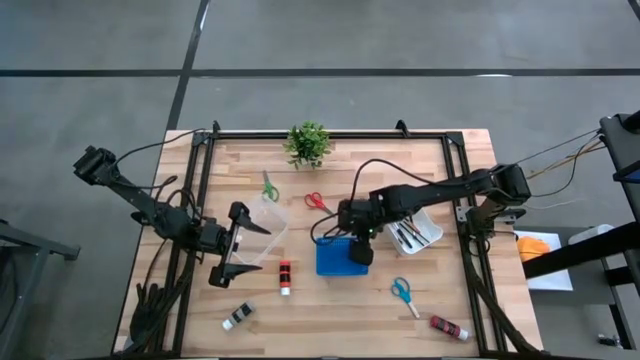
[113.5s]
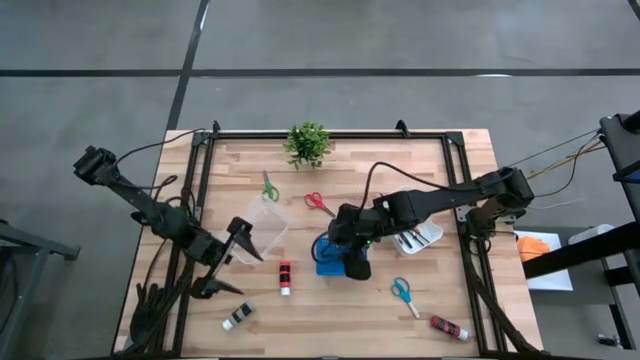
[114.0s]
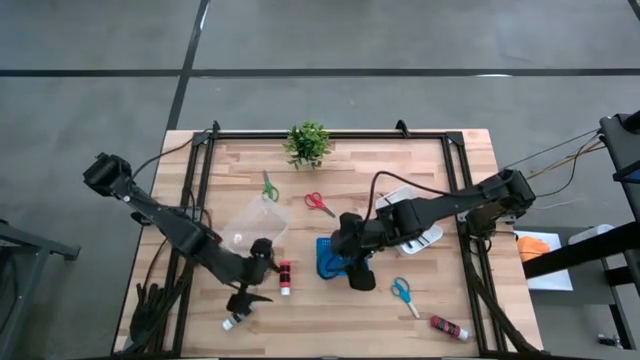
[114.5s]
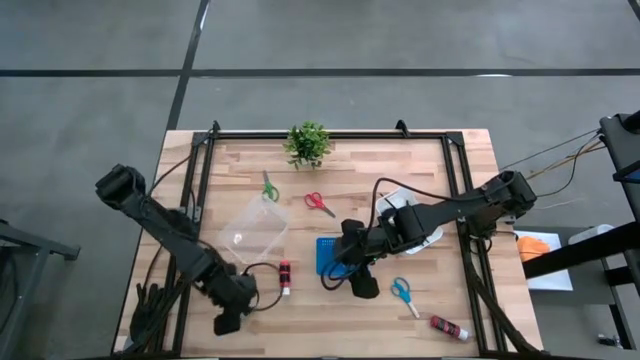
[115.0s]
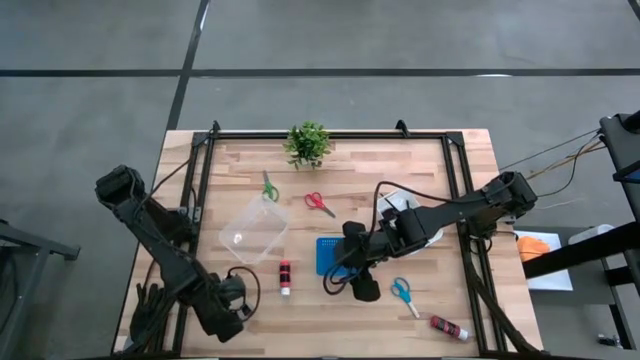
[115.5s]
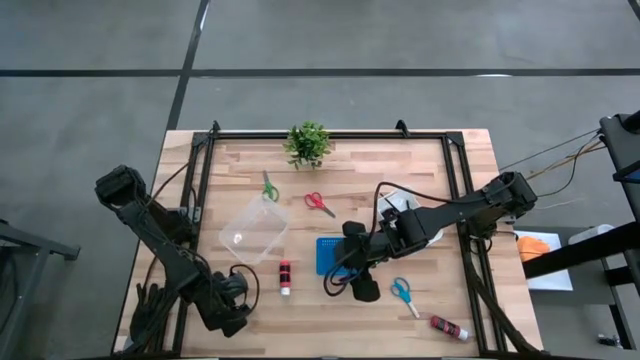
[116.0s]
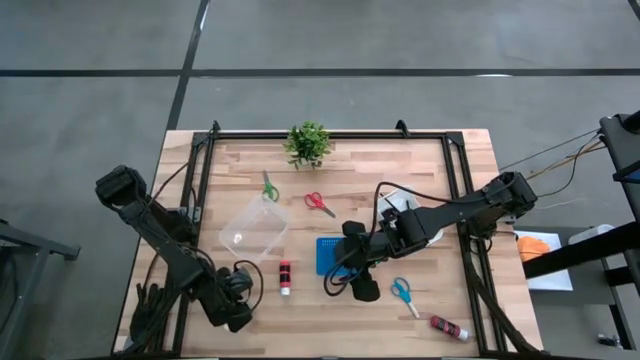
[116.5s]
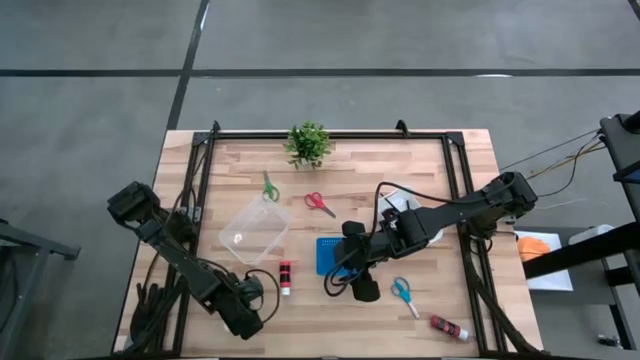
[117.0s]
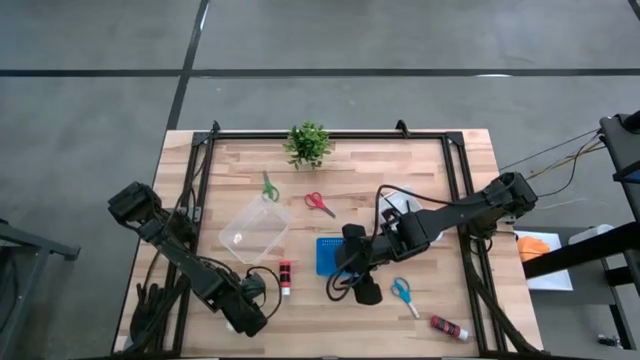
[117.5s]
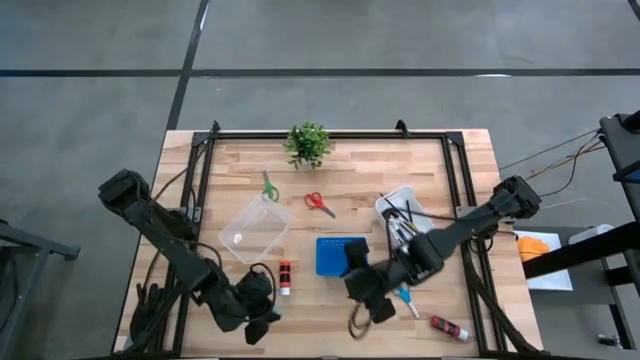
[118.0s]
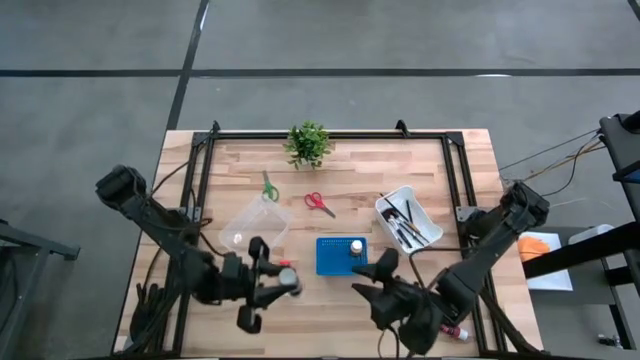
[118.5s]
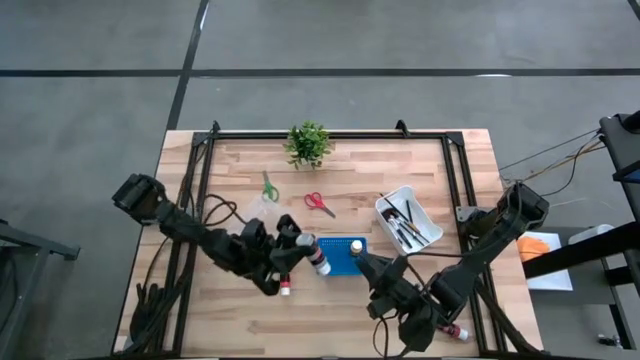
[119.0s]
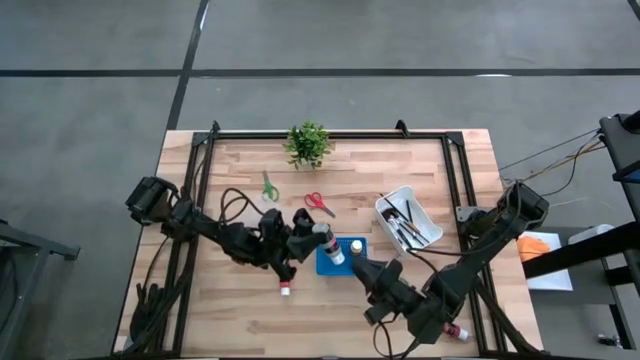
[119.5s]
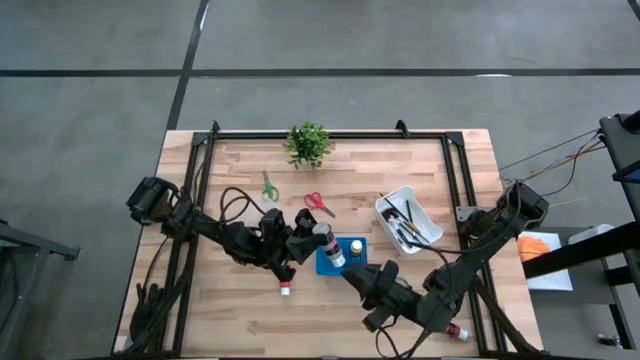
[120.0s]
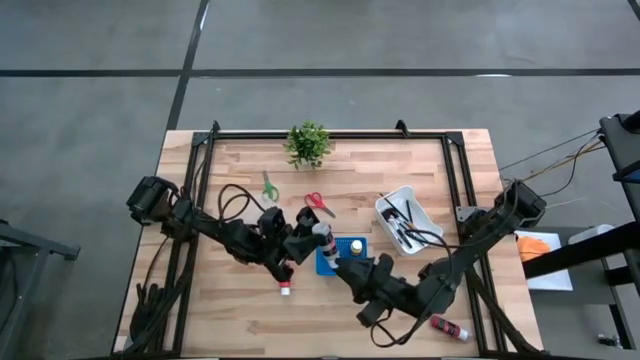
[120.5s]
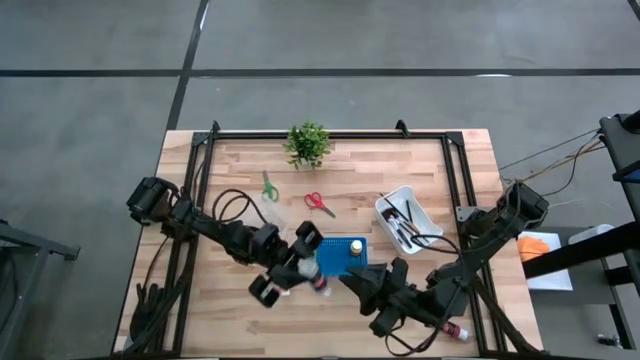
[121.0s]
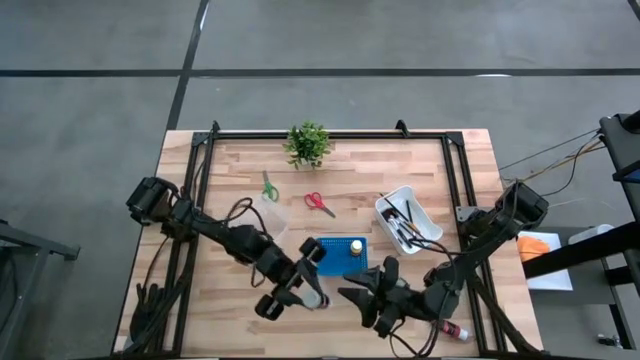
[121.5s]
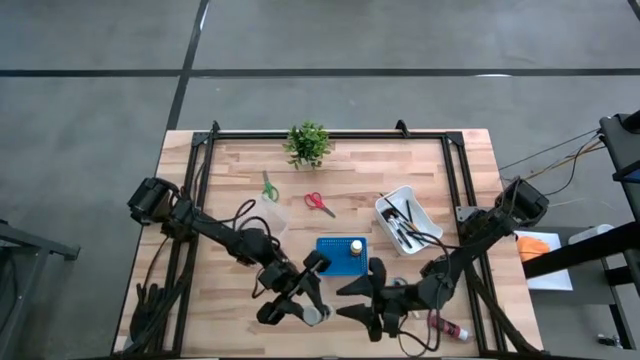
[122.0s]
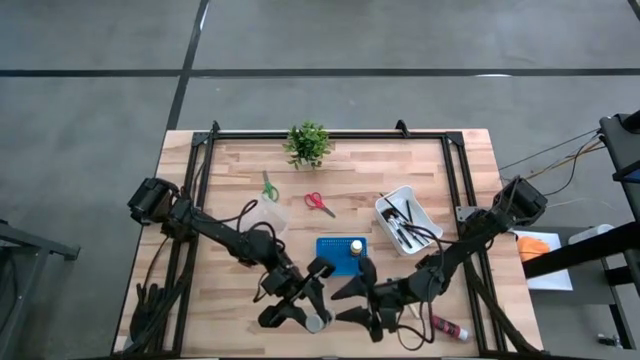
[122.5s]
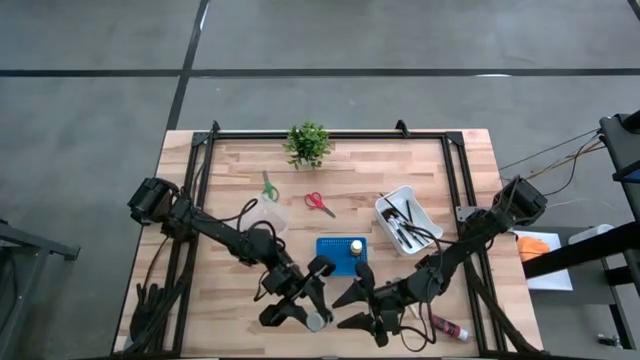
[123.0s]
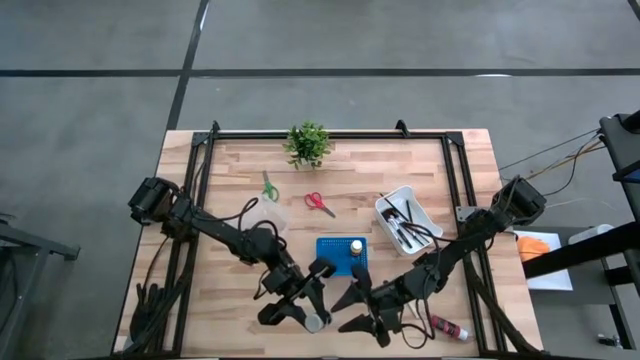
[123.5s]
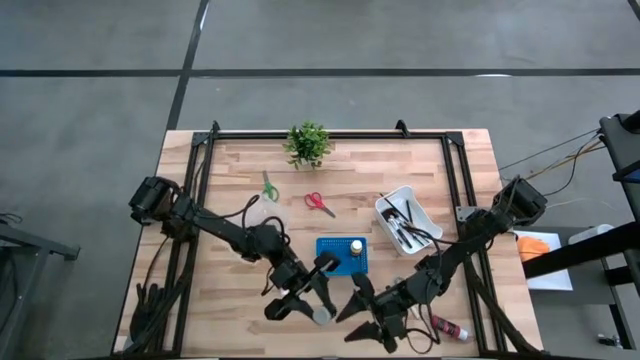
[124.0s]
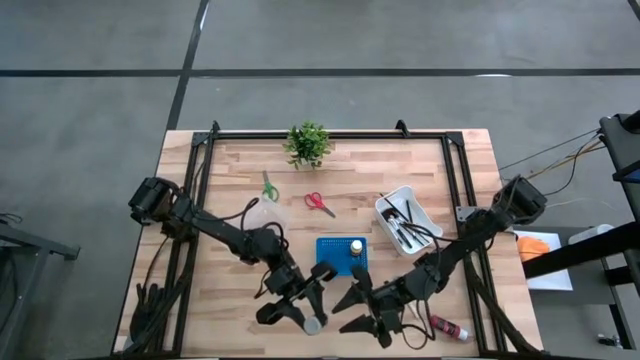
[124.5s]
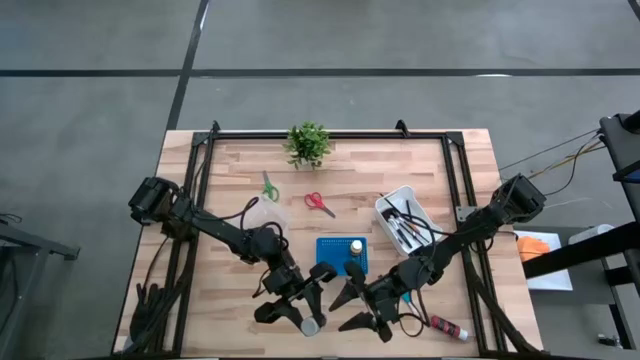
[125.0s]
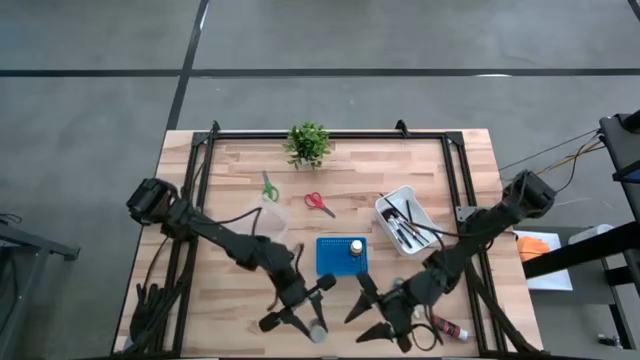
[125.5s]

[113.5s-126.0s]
Task: Pick & Place Paint Supplies
Put the gray paint bottle in the blue bin

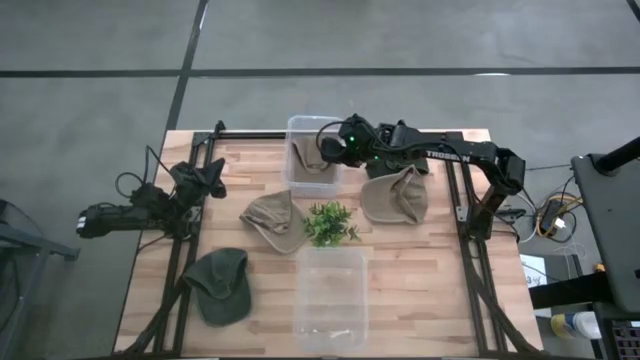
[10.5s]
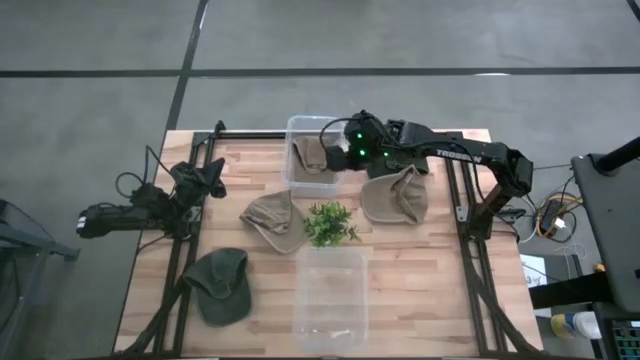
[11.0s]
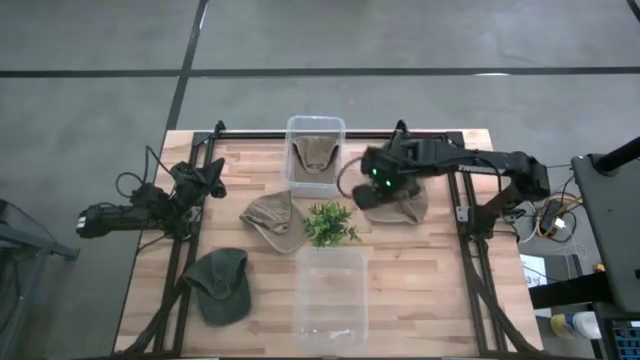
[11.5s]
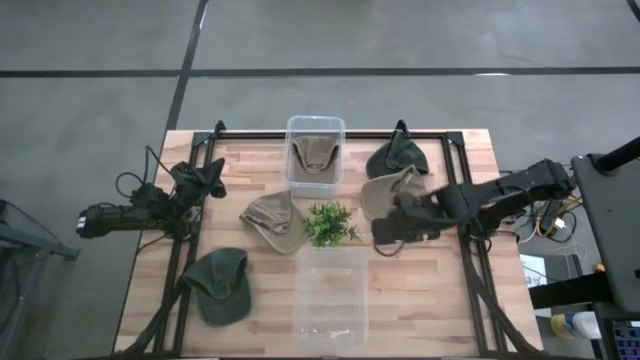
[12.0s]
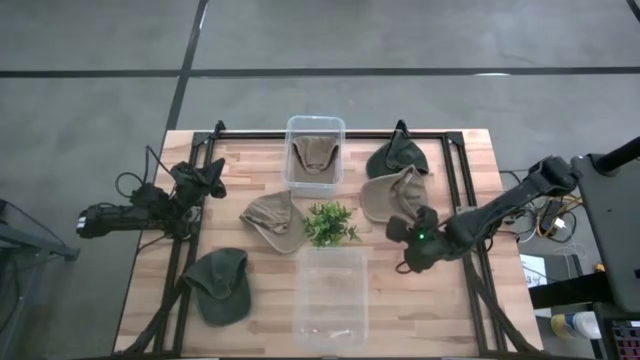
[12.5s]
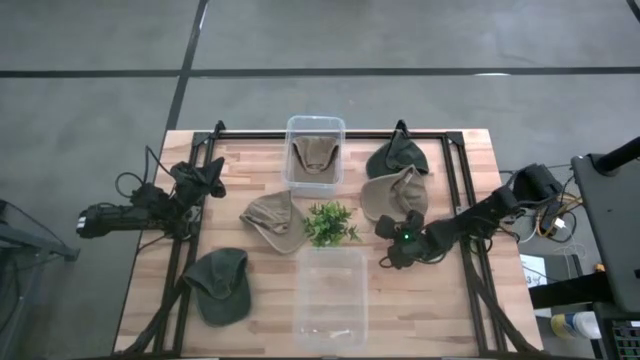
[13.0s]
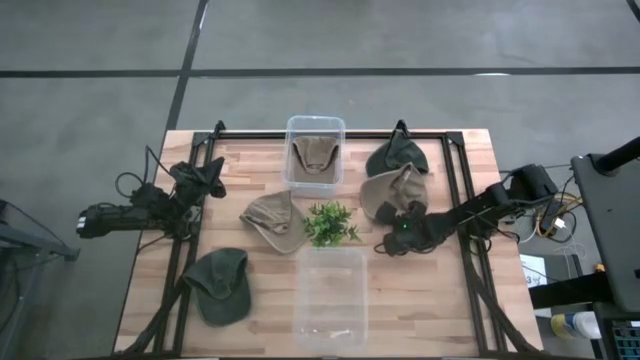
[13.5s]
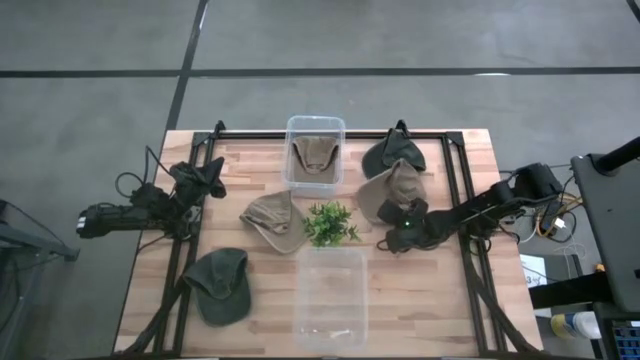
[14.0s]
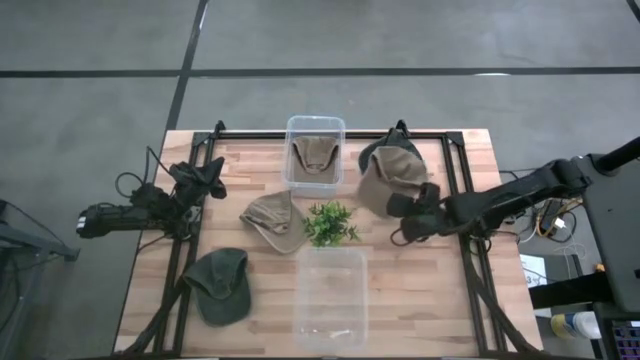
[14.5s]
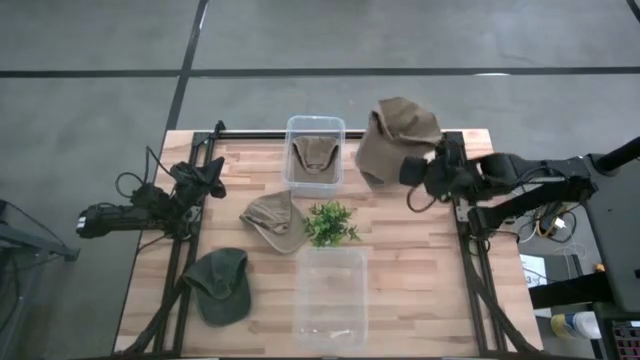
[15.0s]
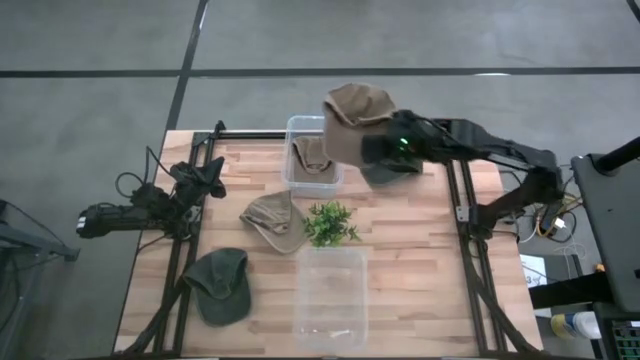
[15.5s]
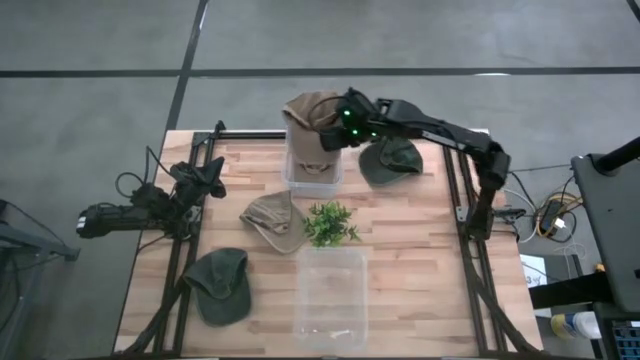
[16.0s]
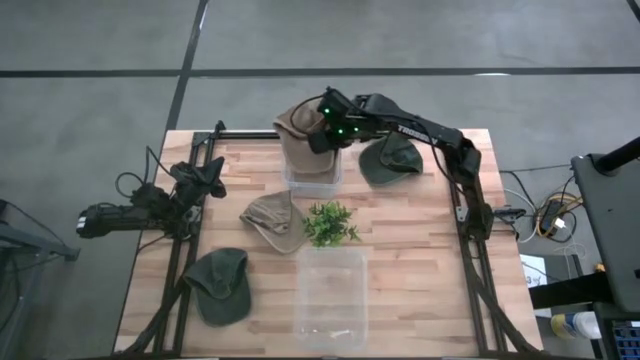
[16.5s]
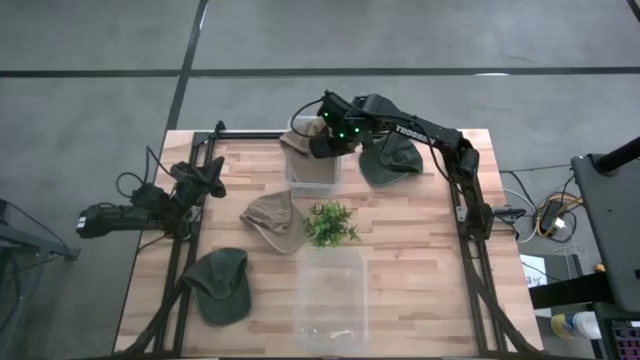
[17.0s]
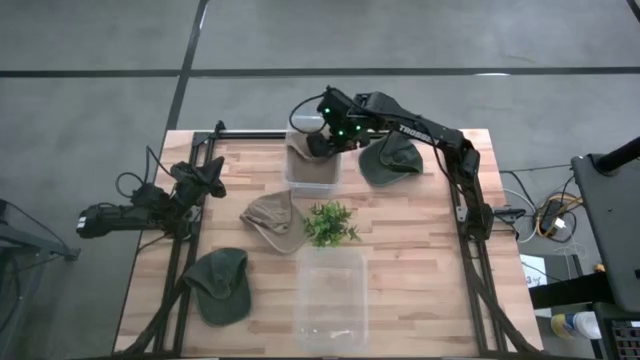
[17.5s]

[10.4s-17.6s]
Task: Pick & Place hat
Put the right brown cap into the top transparent bin
